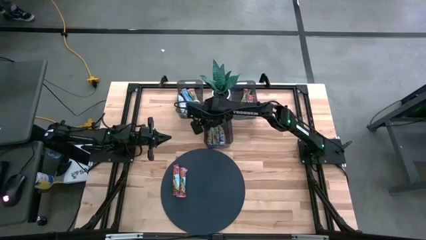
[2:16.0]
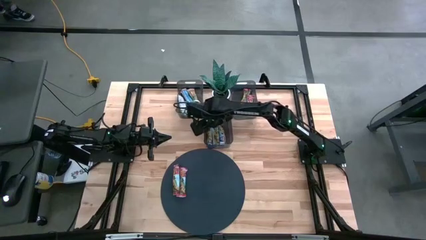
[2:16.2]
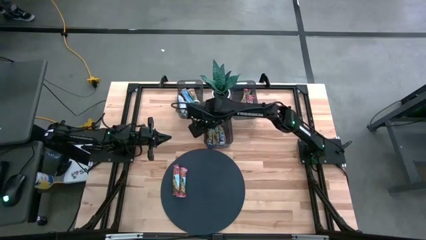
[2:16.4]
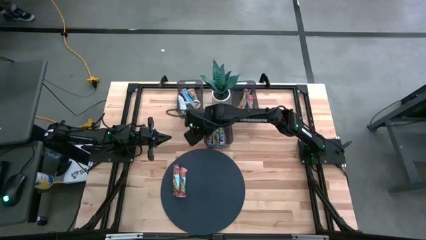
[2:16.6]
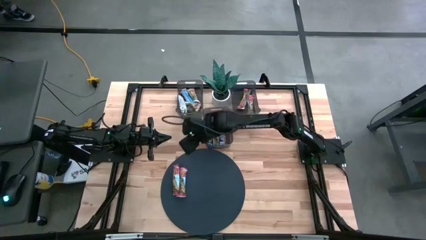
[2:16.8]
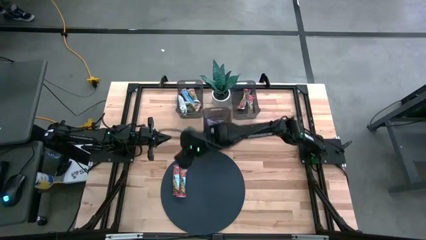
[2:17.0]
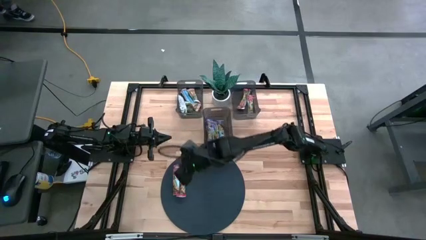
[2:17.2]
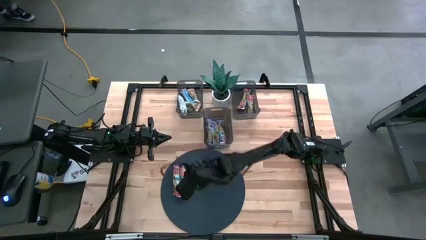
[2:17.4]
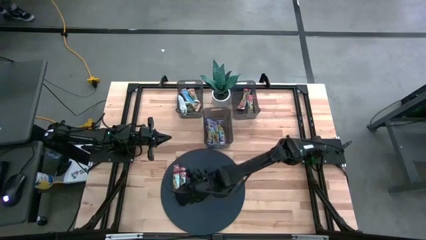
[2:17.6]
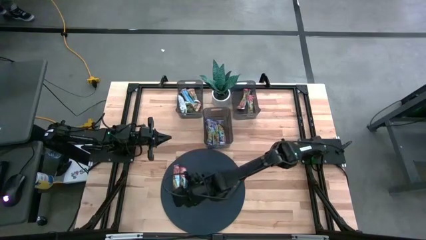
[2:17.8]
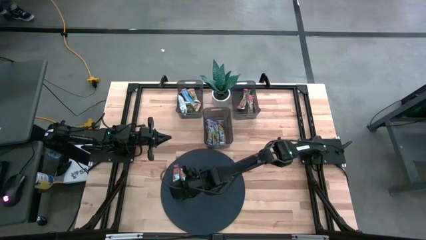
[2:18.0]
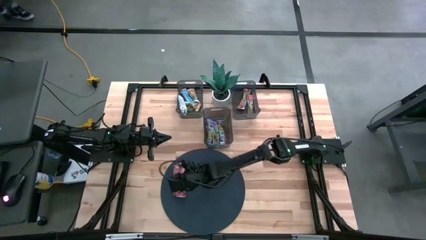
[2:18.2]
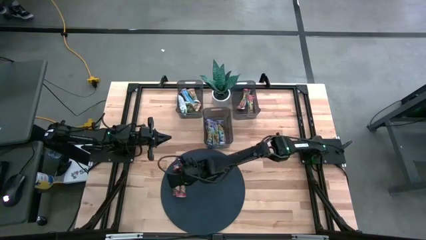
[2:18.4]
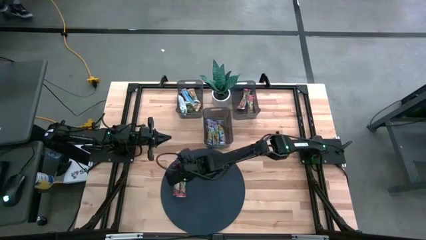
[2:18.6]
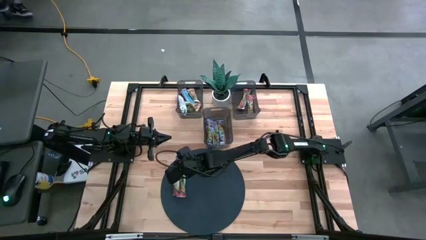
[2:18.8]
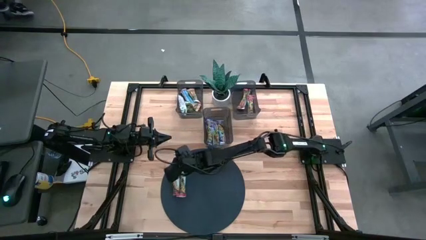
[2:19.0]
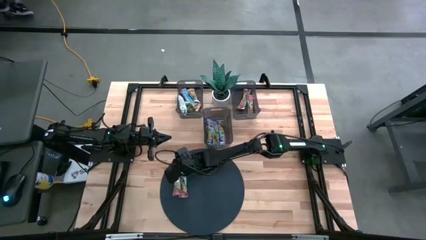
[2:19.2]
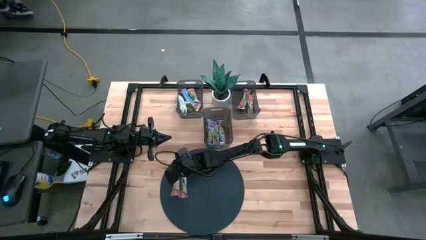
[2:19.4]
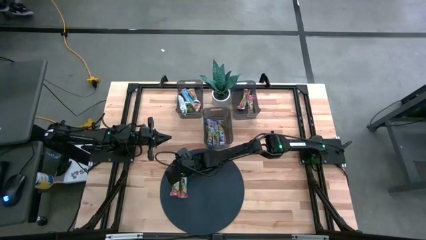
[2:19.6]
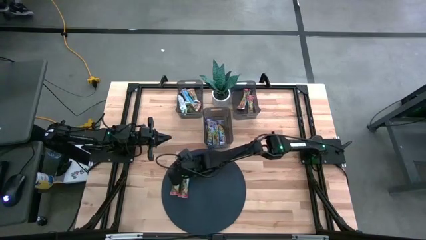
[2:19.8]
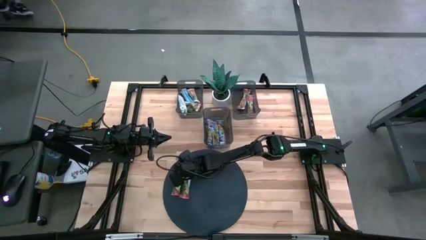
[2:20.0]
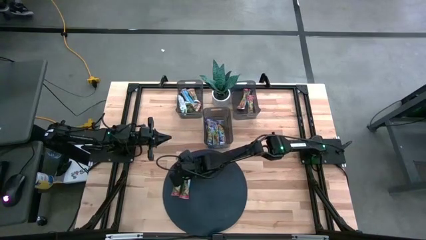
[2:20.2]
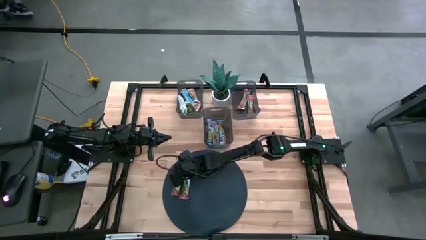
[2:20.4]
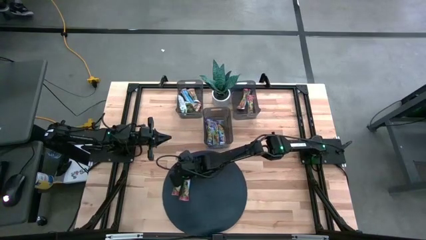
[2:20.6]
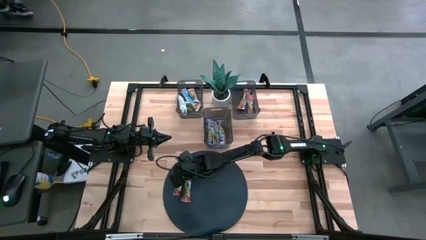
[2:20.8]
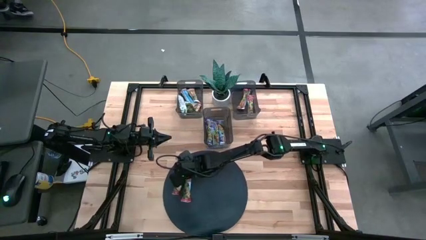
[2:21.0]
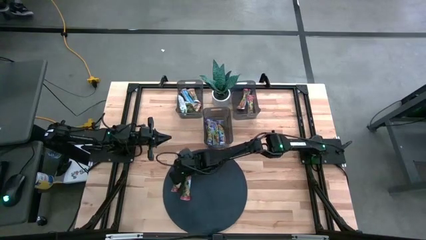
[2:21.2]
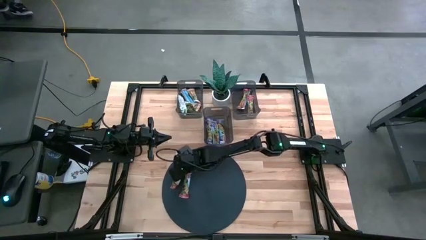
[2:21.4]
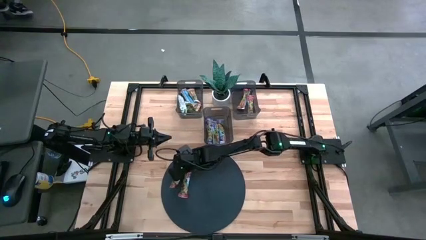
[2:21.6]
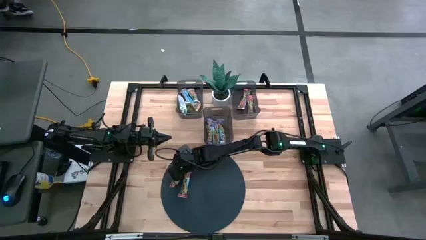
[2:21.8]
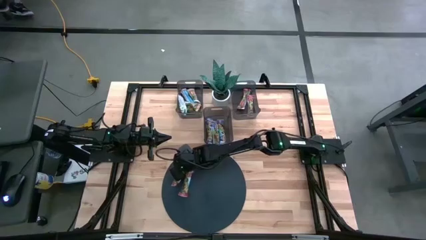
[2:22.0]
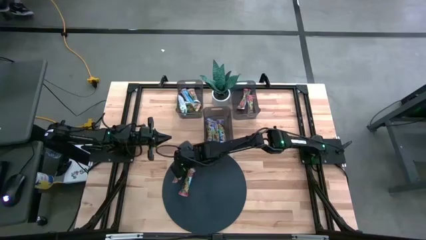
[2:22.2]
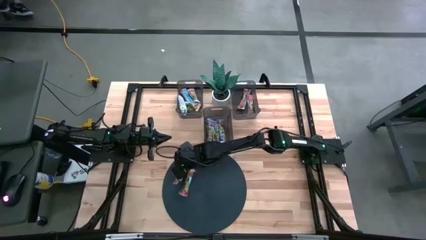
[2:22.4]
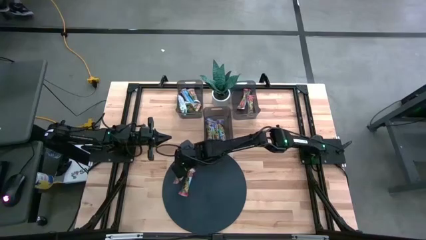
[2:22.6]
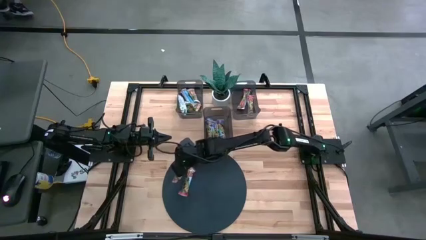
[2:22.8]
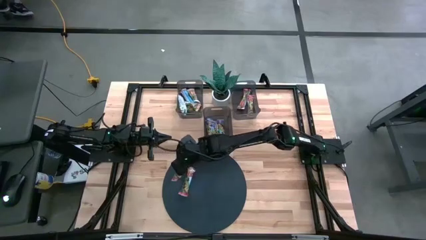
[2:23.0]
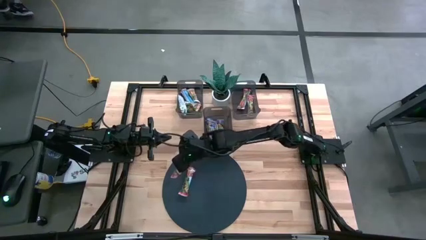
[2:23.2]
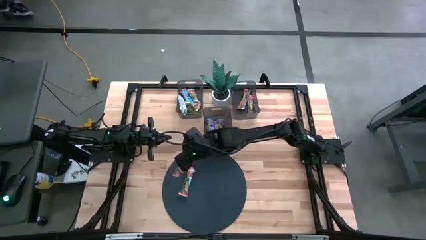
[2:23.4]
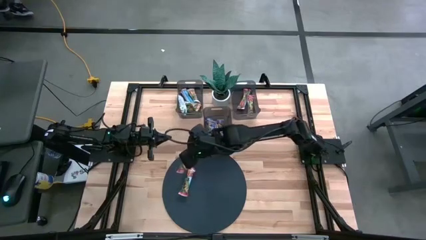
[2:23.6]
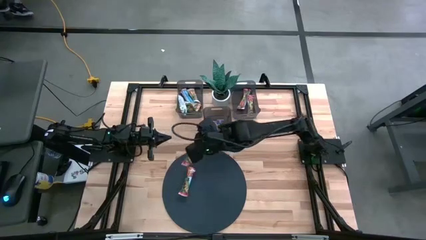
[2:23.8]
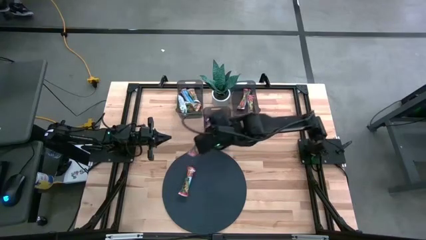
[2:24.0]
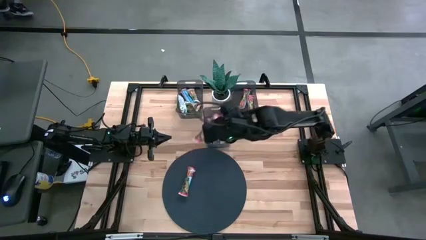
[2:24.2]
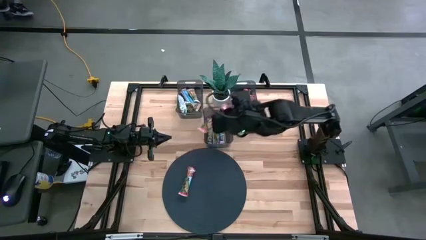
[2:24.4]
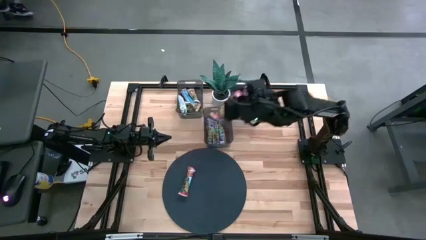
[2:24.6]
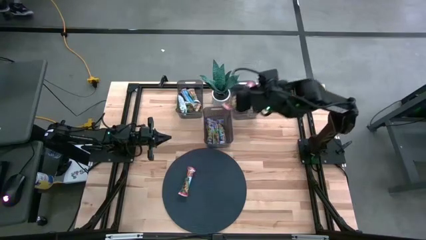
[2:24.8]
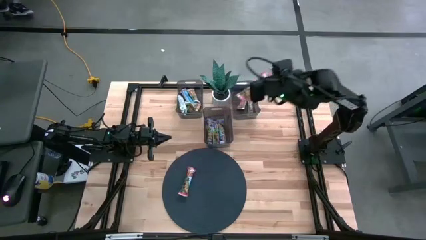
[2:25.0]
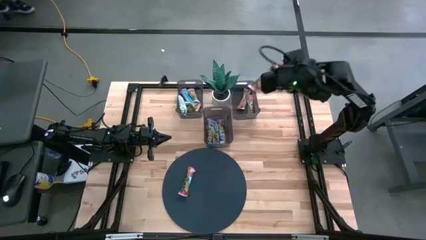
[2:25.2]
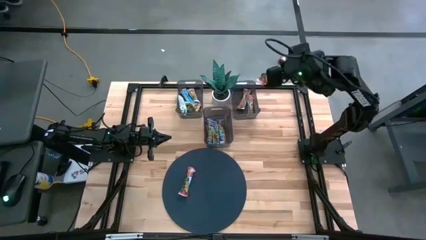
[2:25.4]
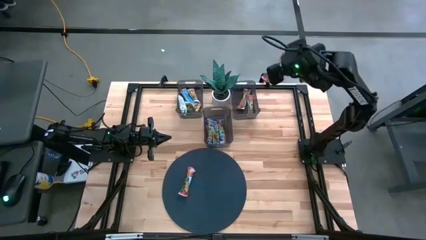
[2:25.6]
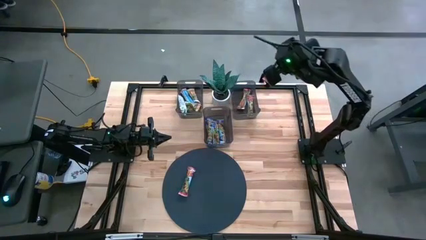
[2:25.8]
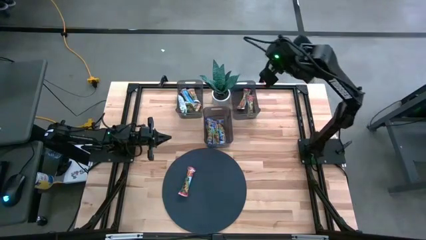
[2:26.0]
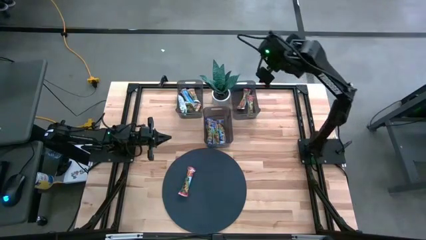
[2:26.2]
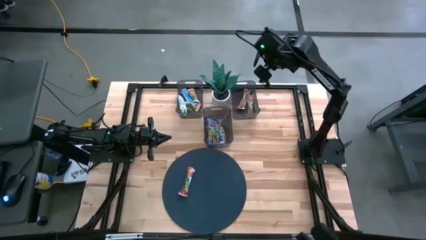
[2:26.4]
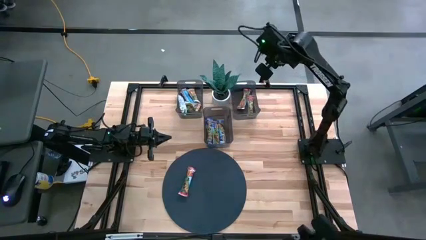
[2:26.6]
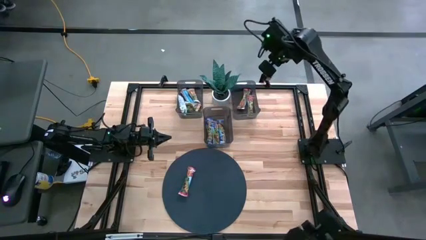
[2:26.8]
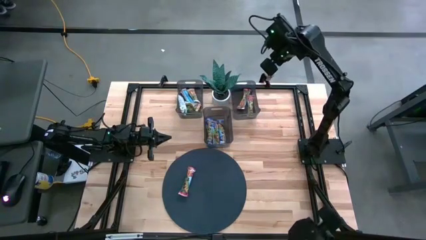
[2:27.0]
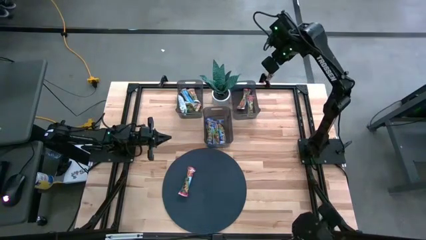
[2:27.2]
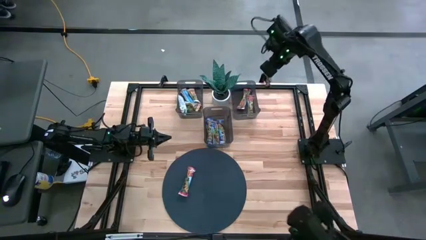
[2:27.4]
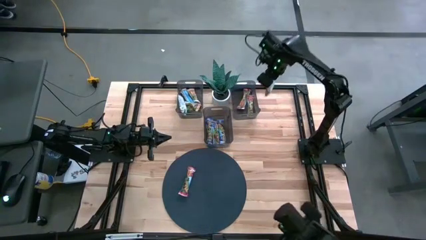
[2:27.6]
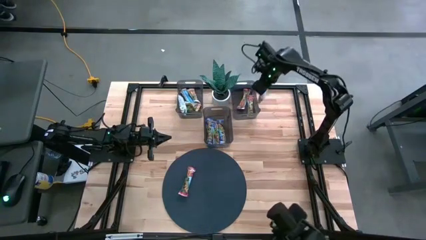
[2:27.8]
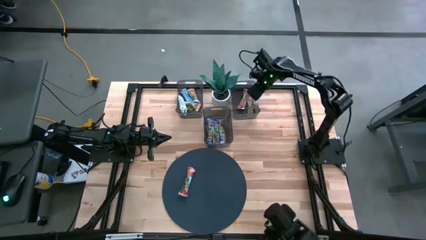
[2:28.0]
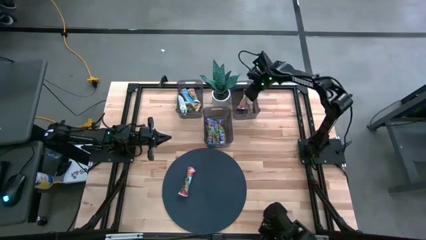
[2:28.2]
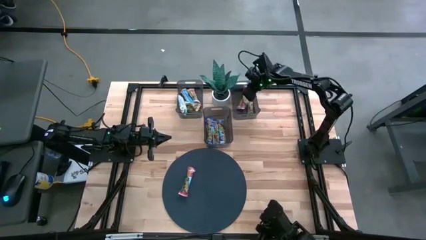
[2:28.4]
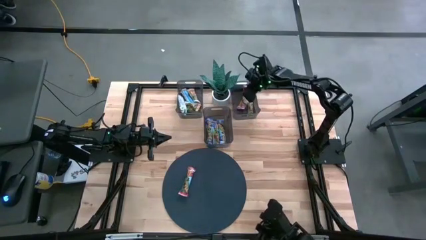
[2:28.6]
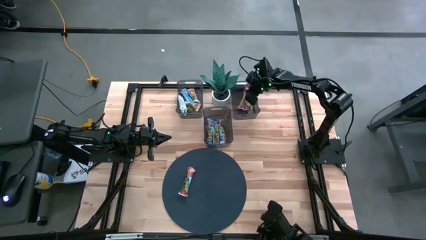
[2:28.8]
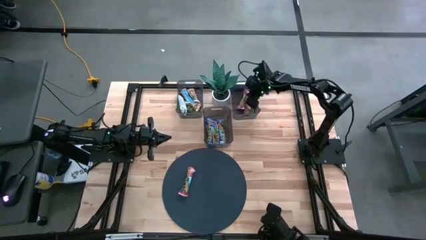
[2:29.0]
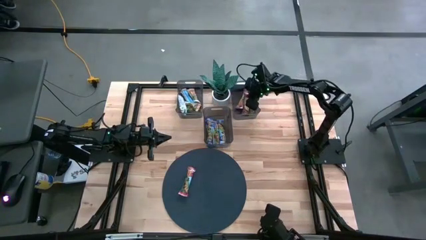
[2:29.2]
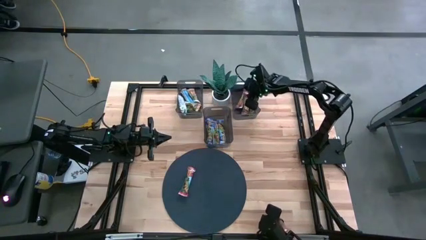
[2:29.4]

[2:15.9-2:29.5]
Task: Pick and place Granola Bars by type
Put the red granola bar into the right black bin
